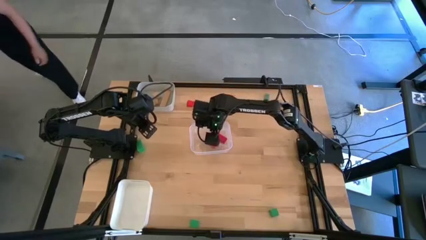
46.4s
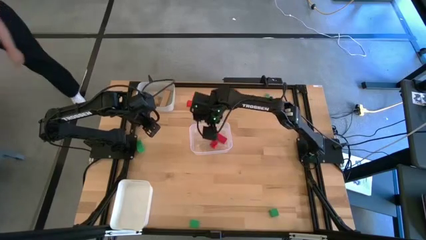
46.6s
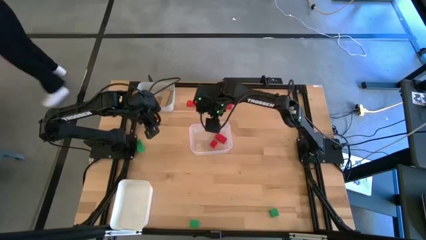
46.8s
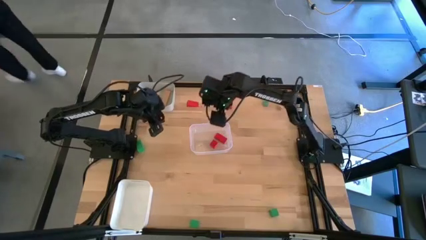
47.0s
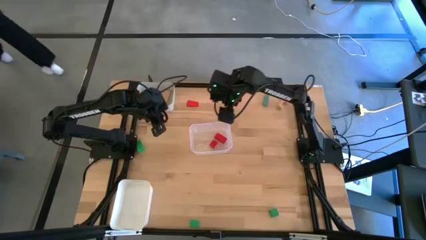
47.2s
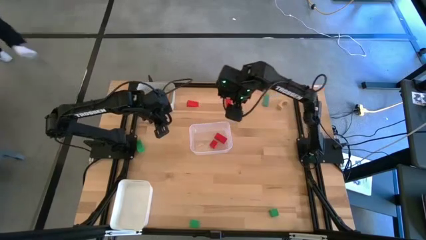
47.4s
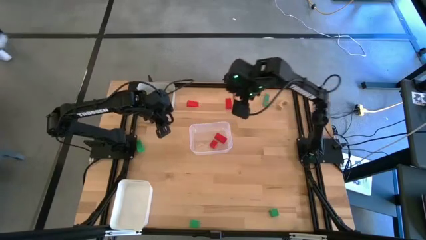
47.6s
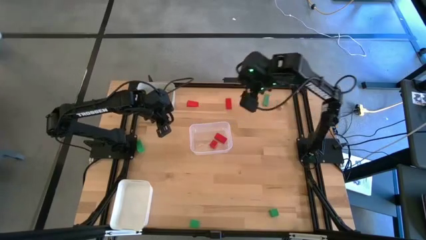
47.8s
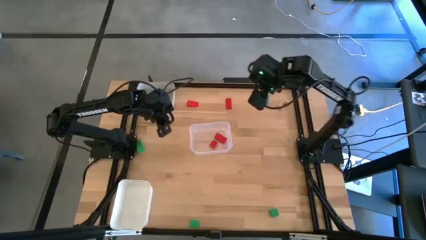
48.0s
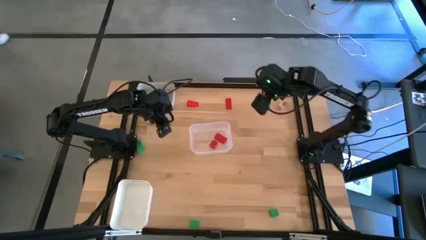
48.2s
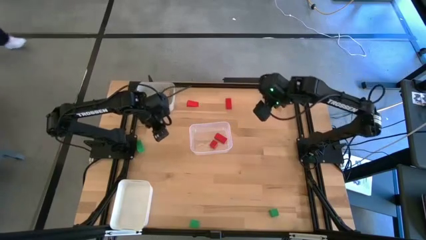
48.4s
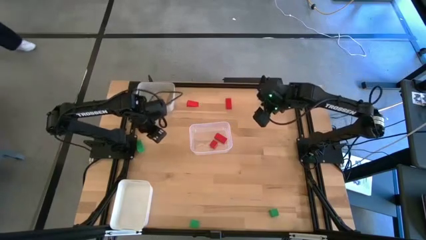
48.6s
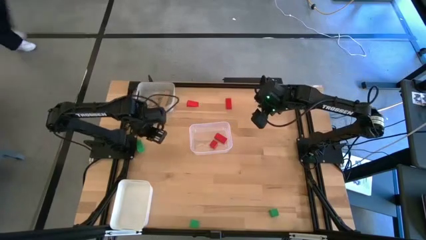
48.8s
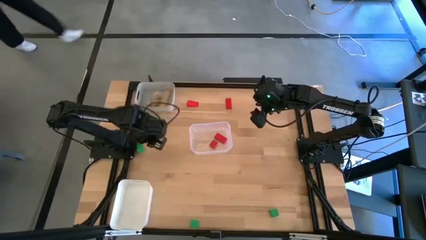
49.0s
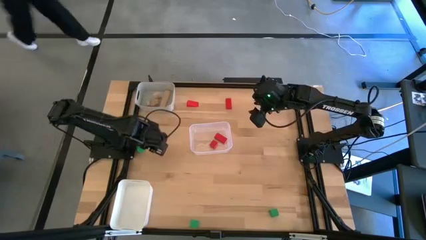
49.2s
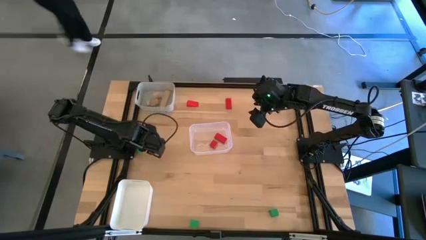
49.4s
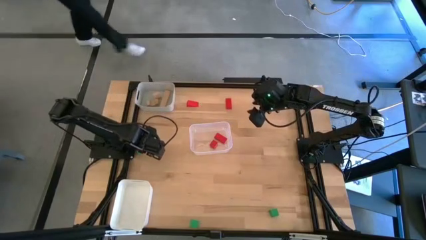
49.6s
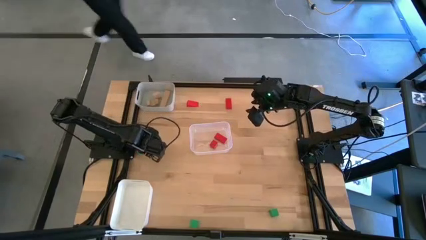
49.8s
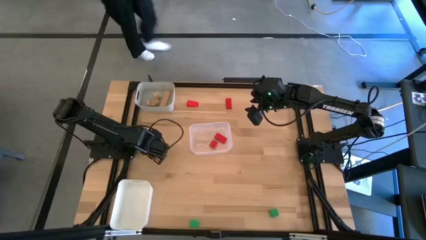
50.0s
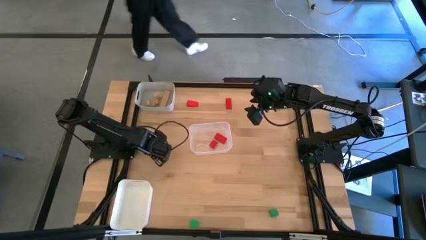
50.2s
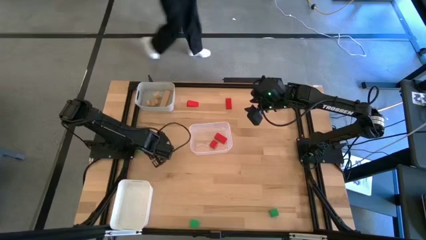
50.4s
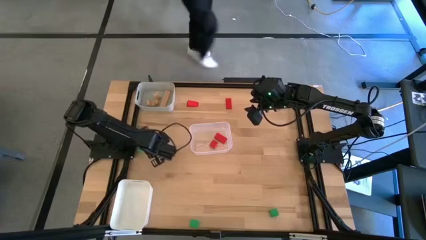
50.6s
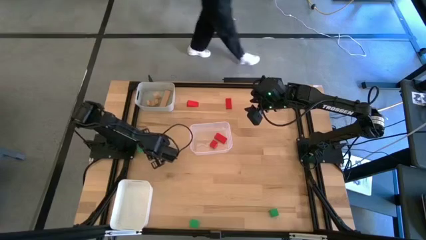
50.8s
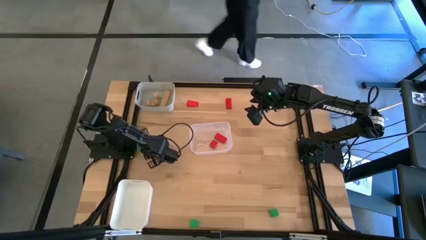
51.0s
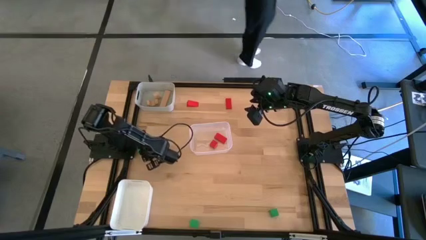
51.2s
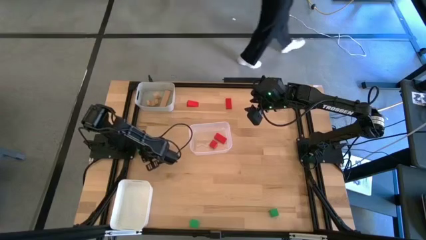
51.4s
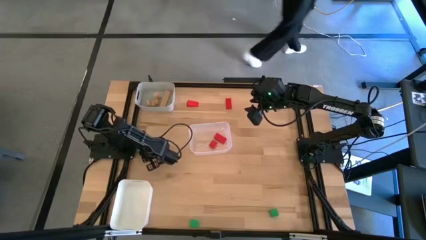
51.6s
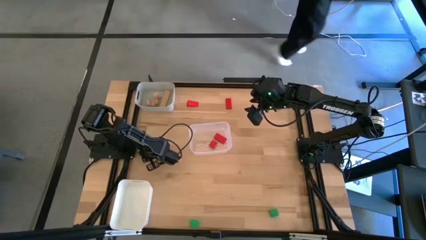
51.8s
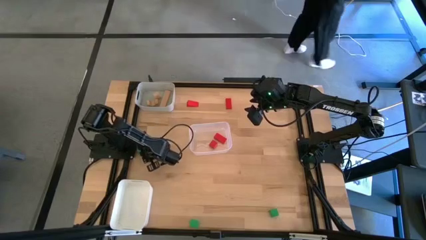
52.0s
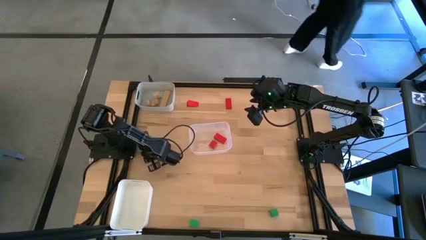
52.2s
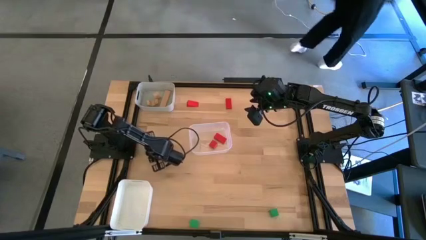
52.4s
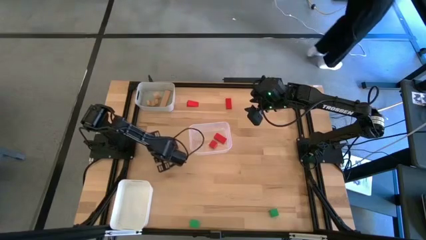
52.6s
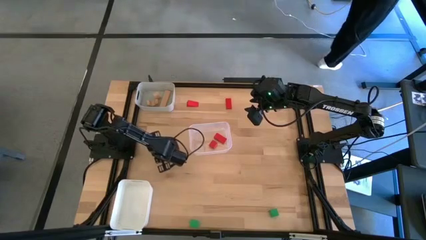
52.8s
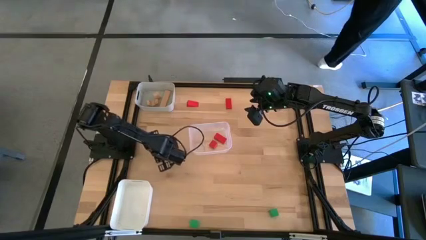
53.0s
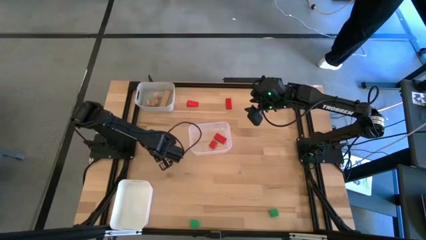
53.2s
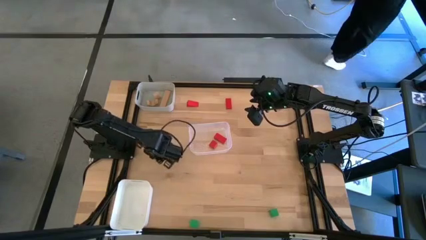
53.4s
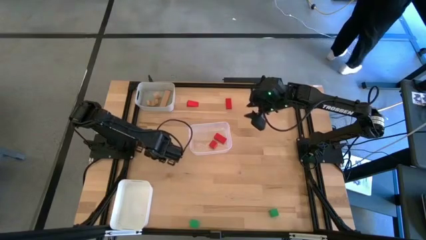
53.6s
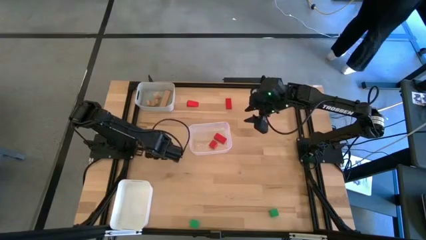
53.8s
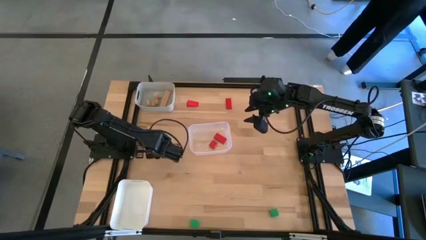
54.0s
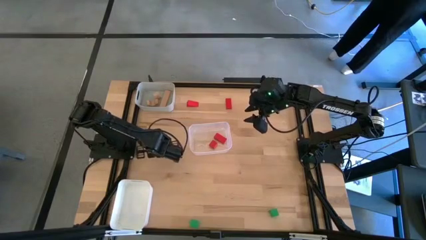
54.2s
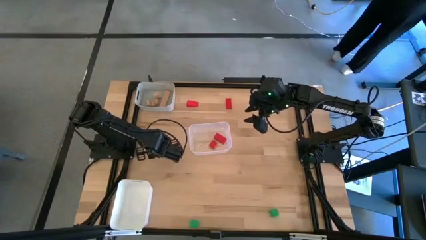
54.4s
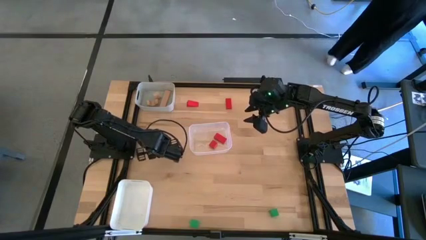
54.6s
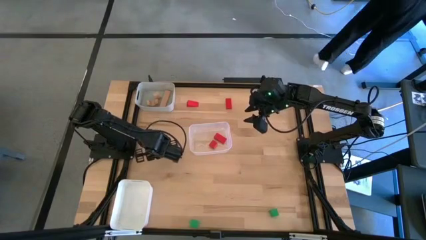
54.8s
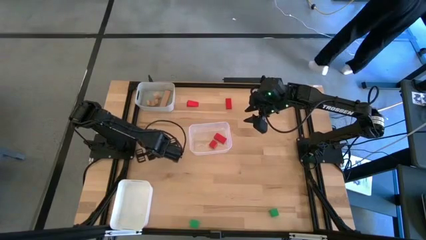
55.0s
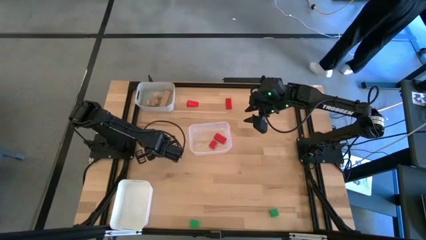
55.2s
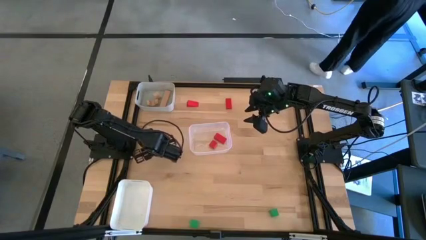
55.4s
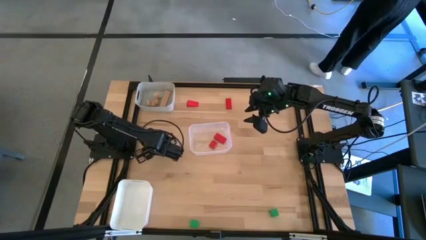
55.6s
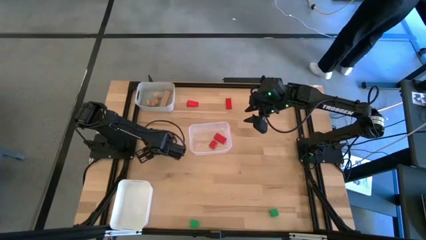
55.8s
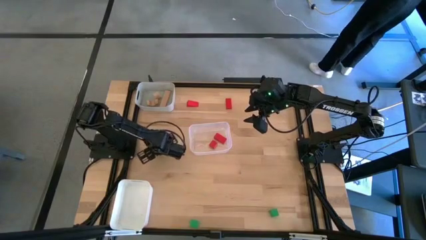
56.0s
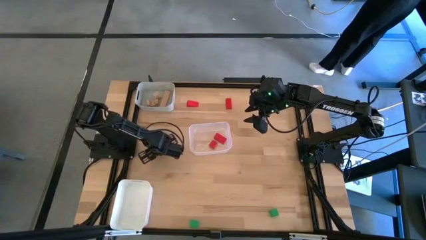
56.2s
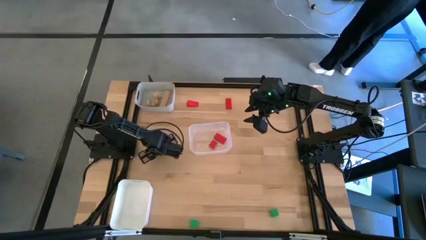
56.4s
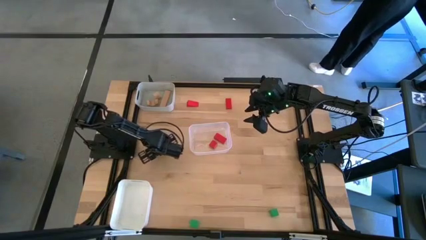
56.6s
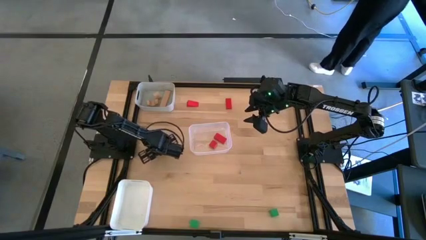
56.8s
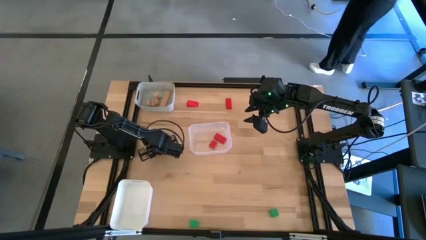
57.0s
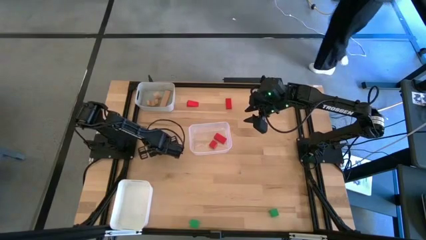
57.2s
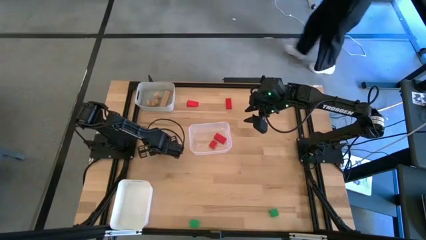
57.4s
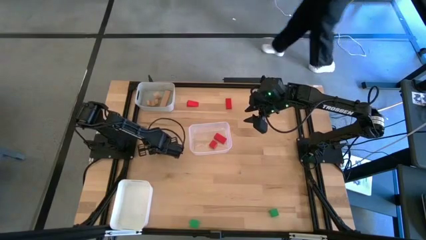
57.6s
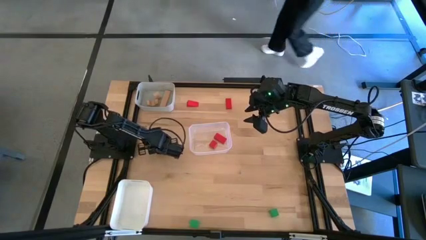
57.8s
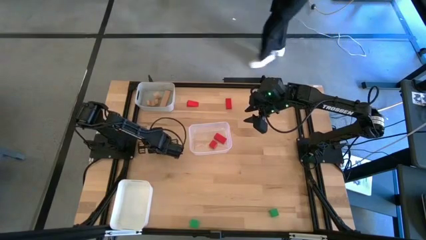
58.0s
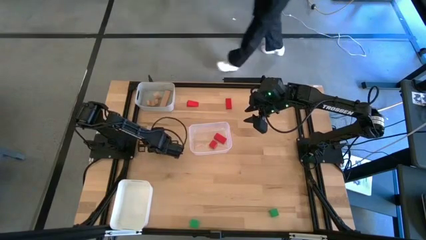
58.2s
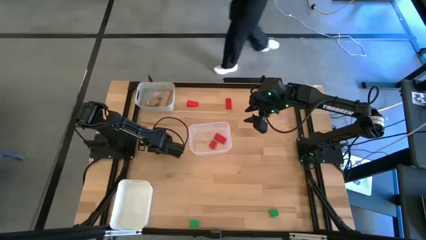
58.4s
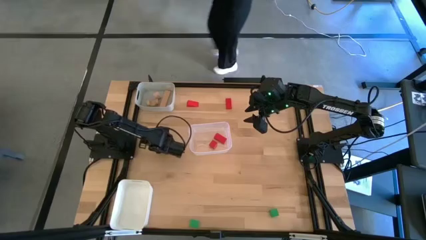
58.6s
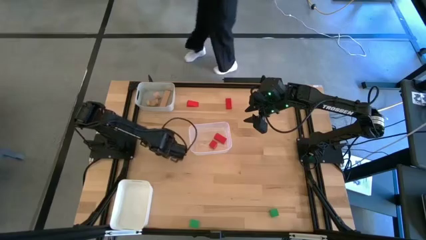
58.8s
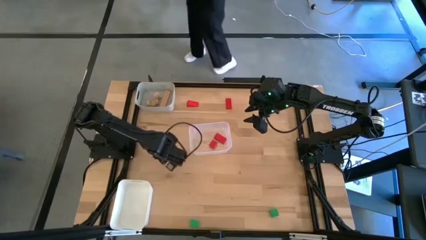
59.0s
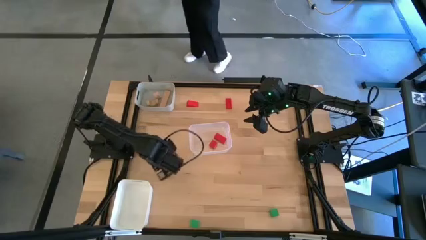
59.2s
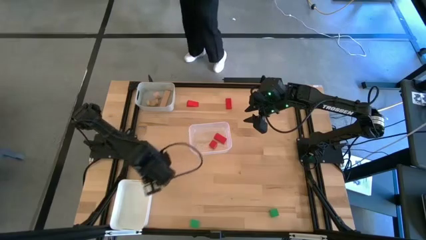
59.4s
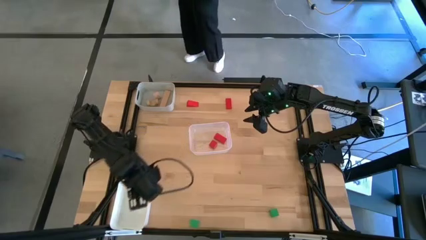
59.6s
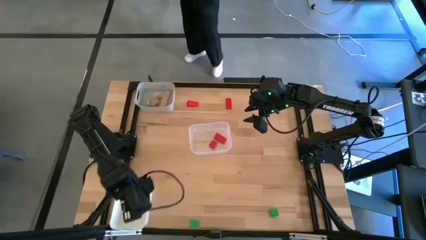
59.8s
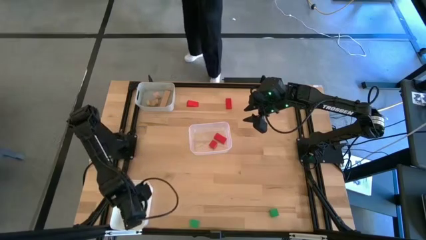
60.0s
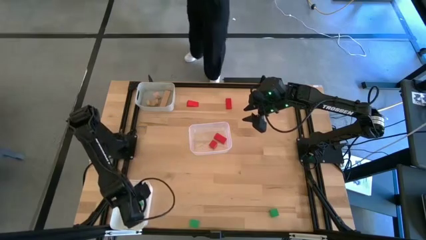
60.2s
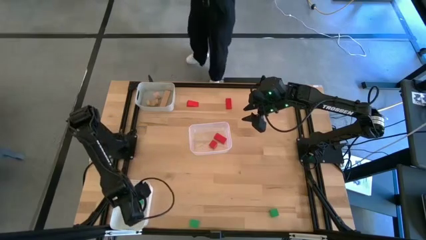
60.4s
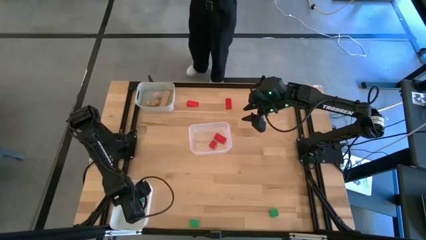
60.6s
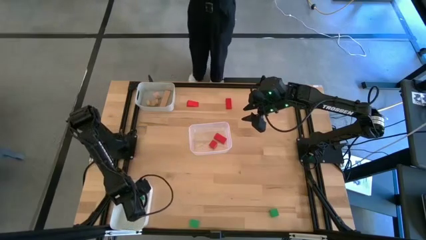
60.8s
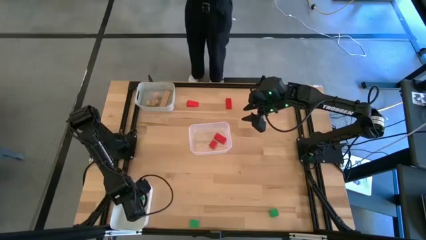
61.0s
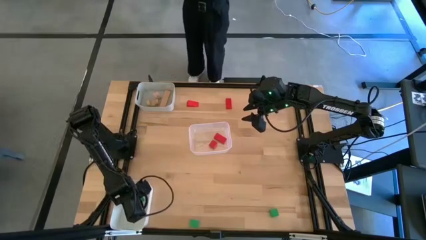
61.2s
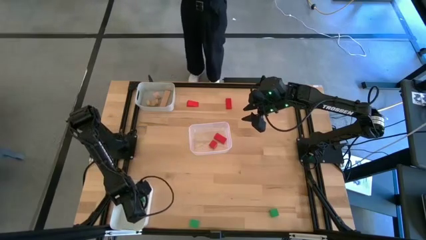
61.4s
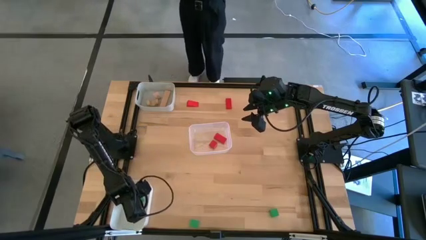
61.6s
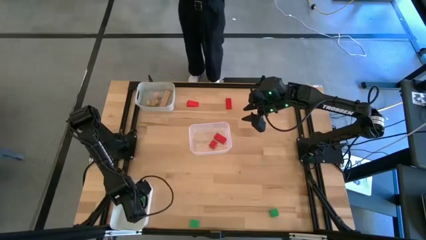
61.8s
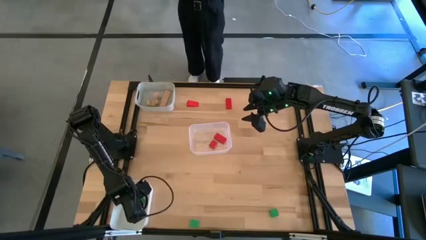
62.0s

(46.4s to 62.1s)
Task: Sort & place blocks by color
Put the middle left green block into the white bin
